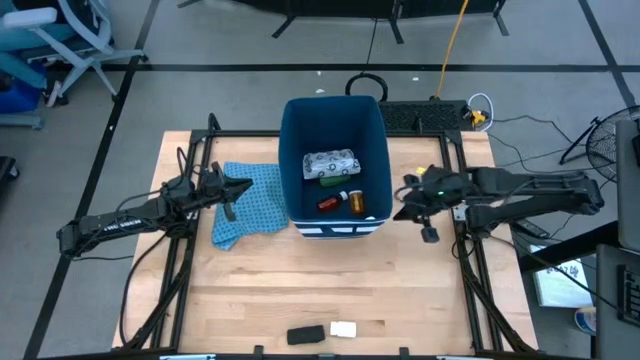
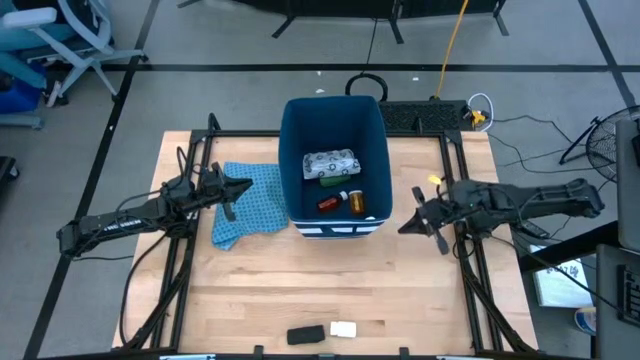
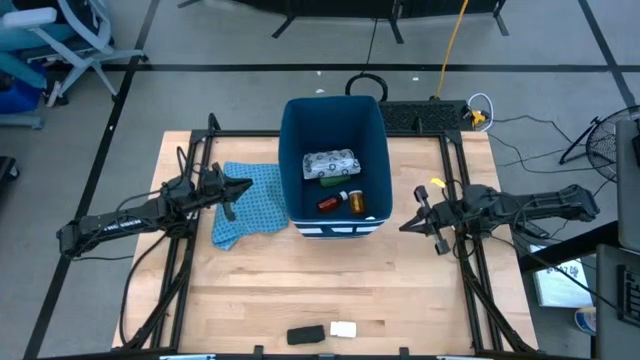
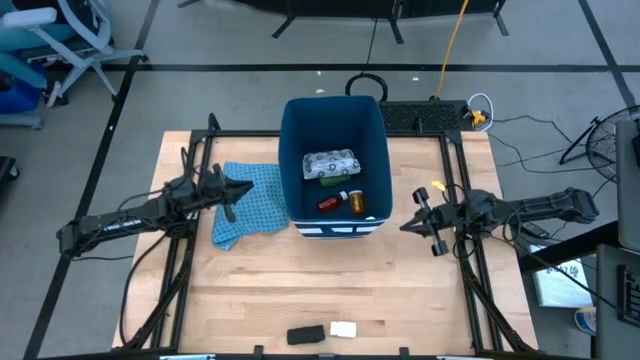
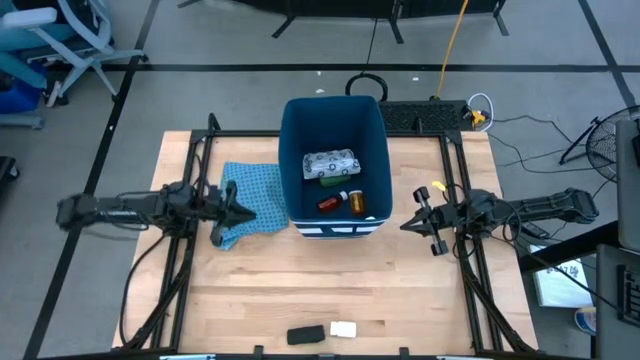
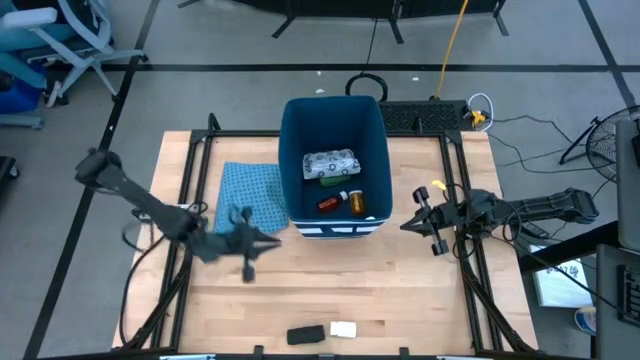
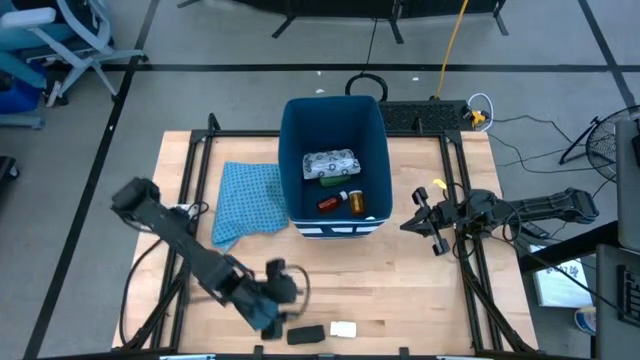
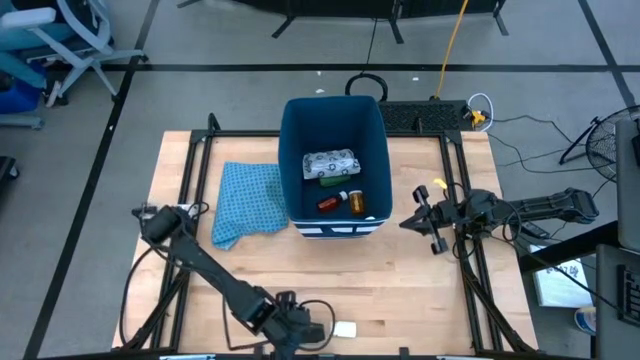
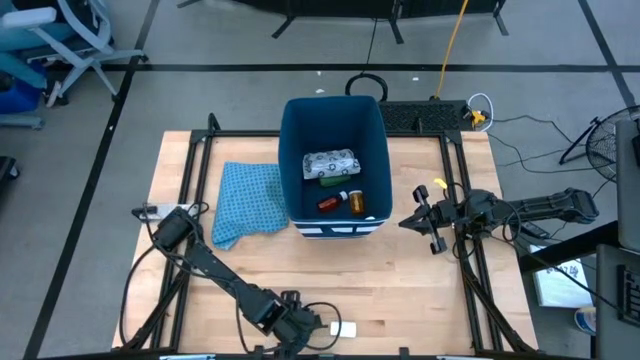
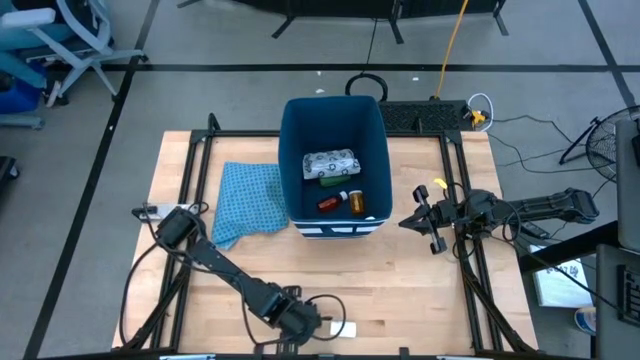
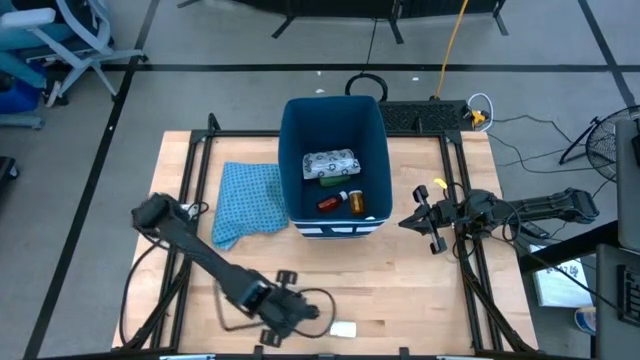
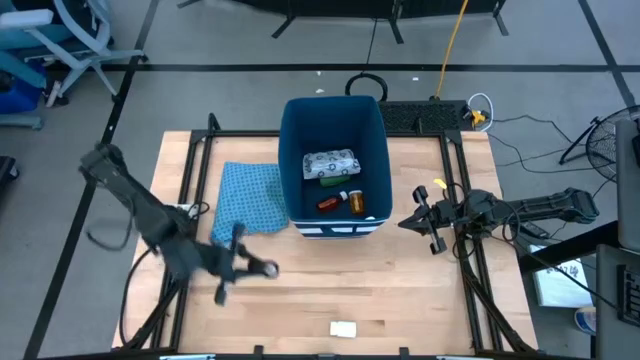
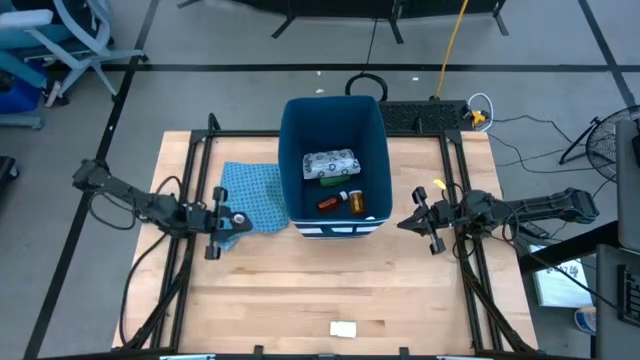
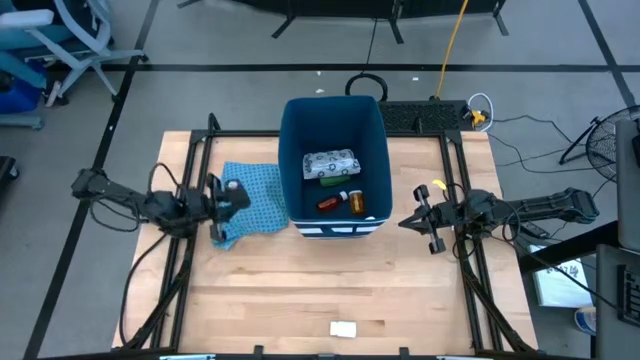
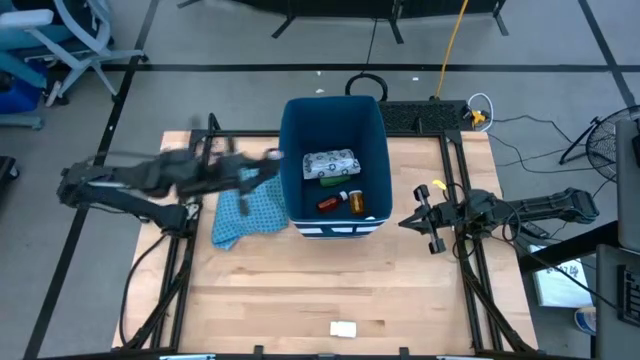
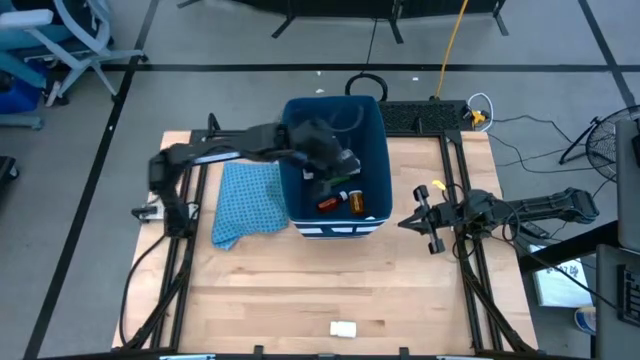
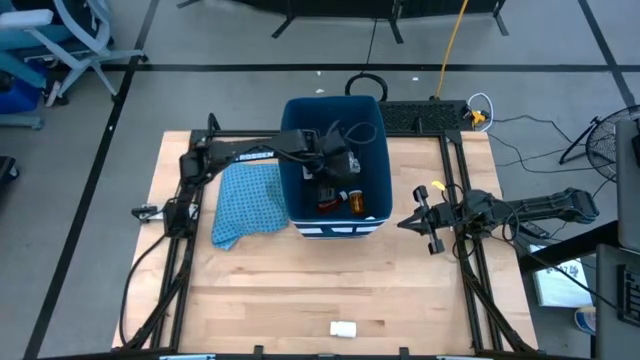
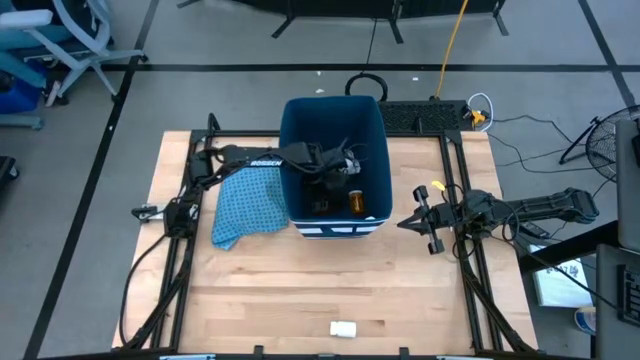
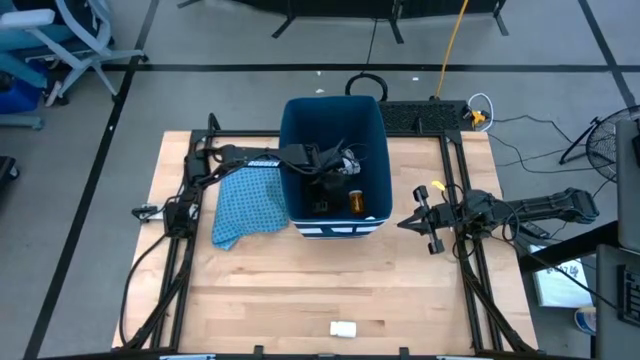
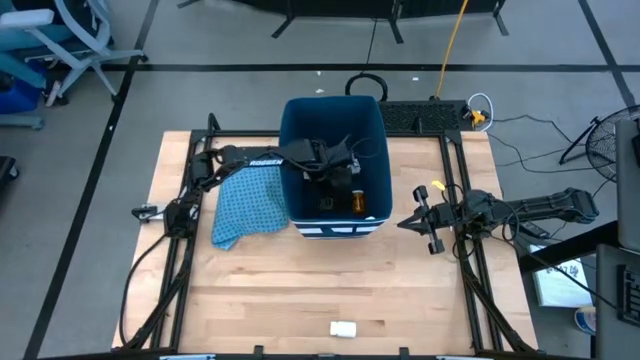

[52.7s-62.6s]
Task: Pick & place medical supplies in basket/bin
Put the black bandage into the blue bin

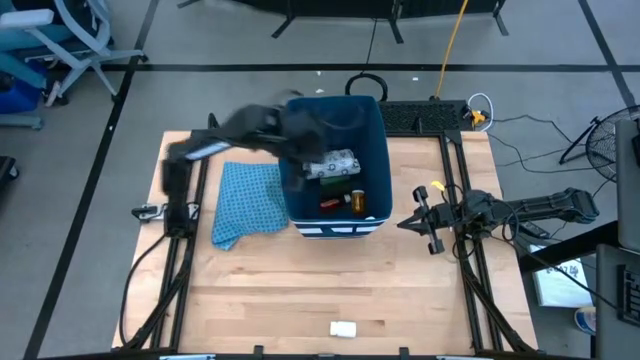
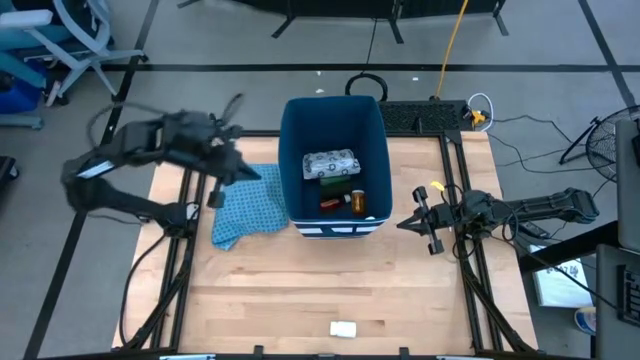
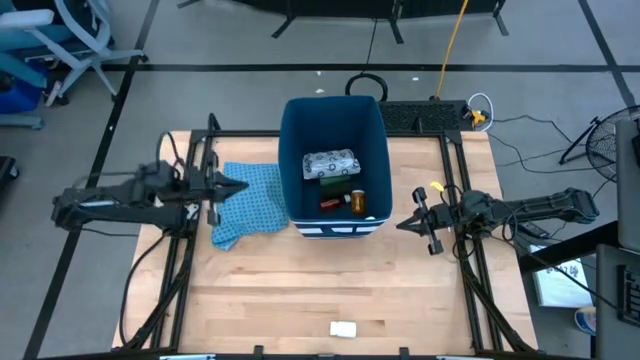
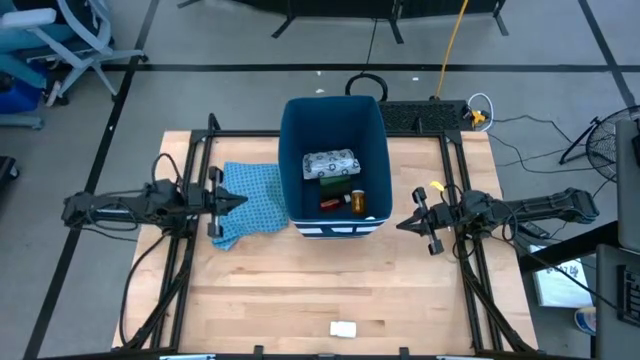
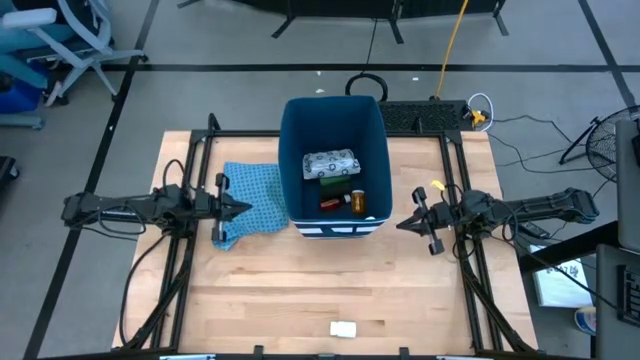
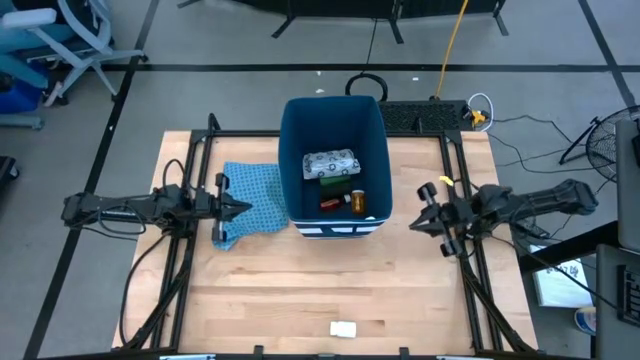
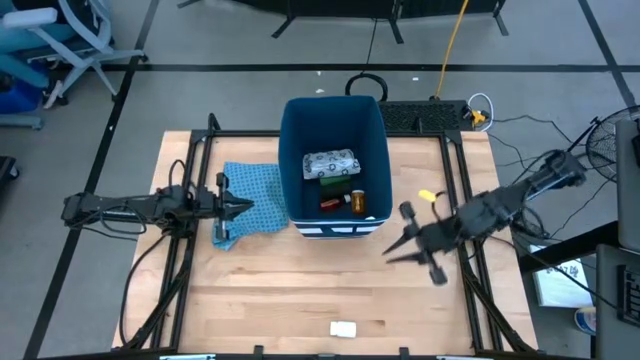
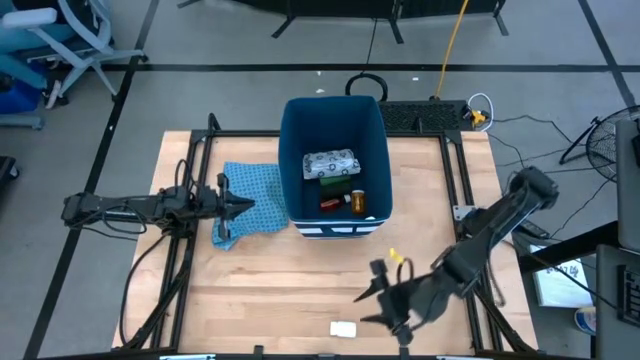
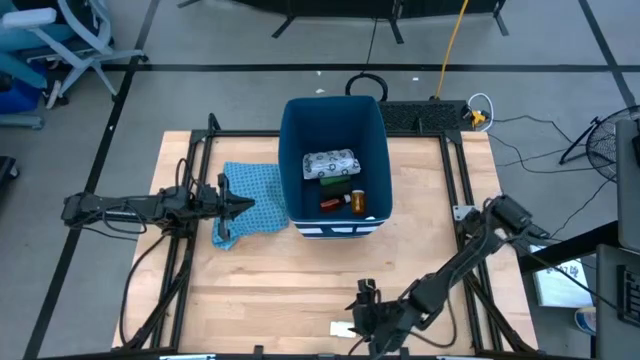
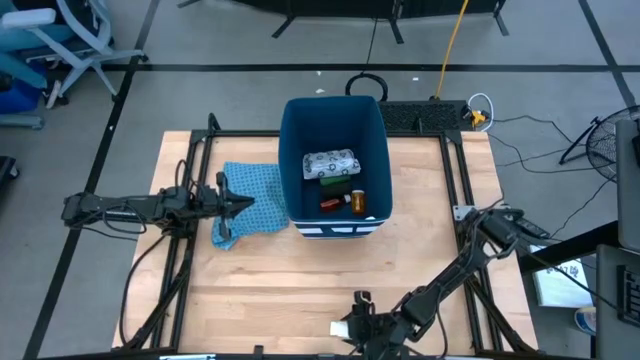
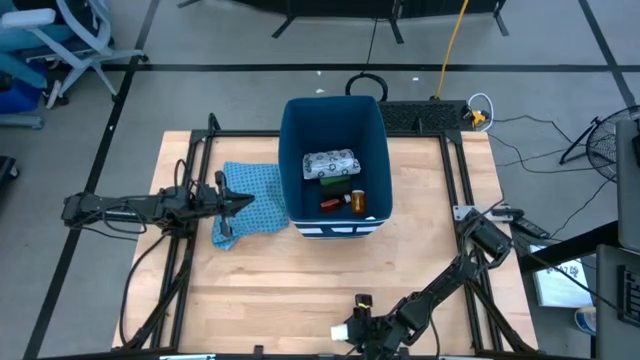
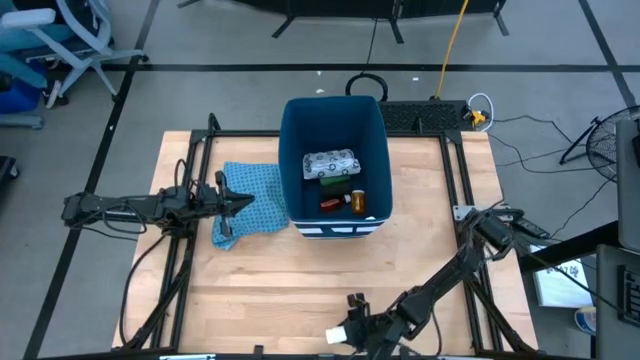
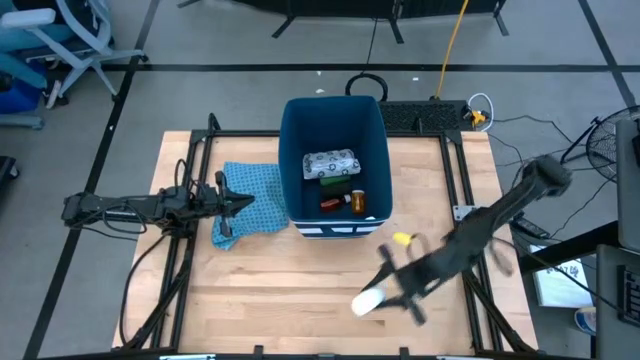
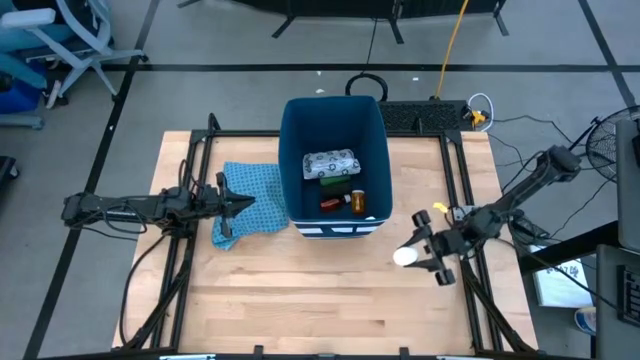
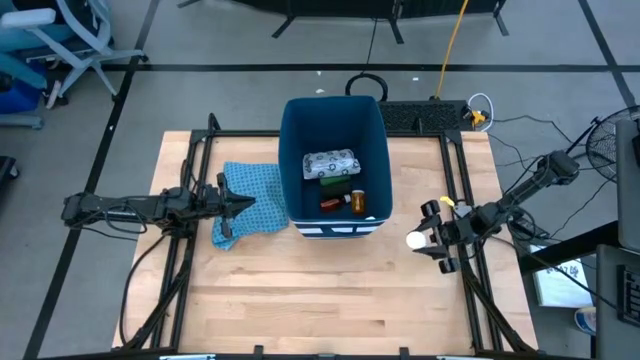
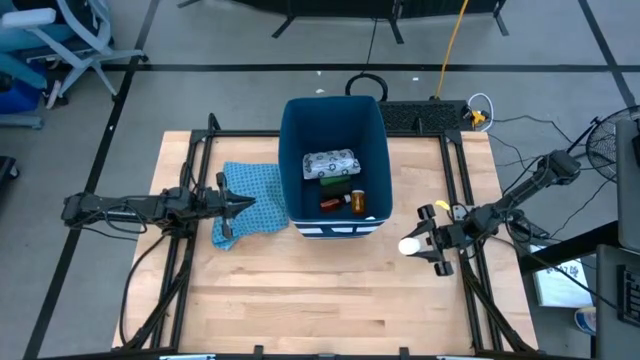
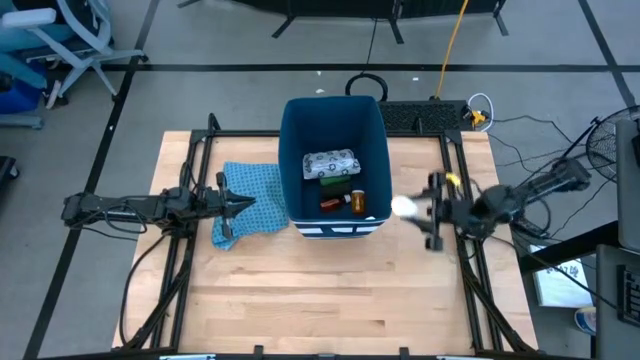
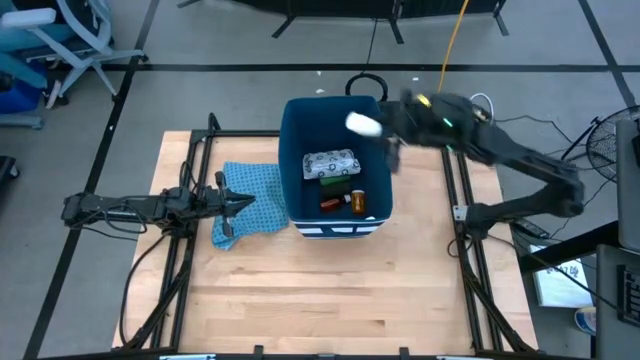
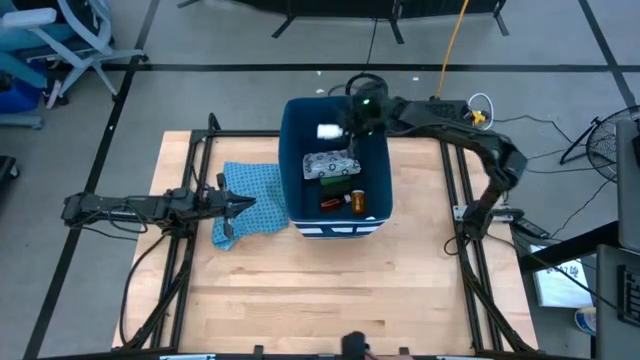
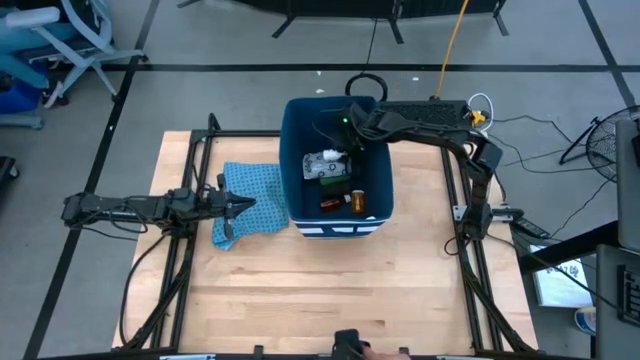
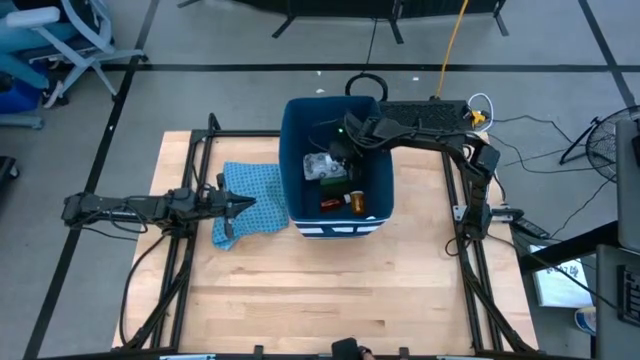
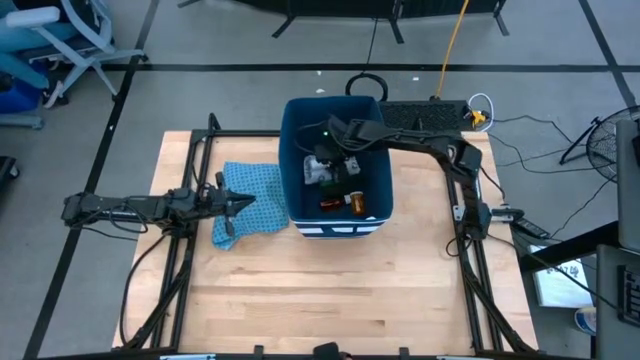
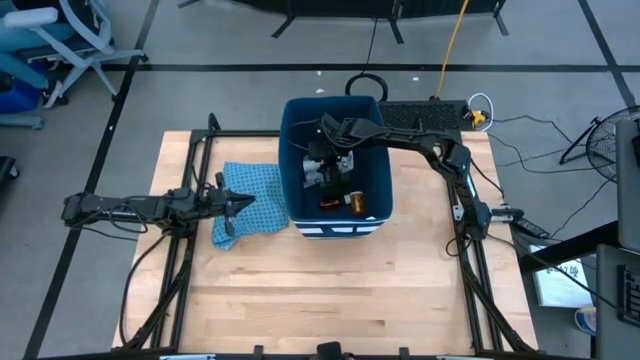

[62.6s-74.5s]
Put the white medicine bottle into the blue bin
